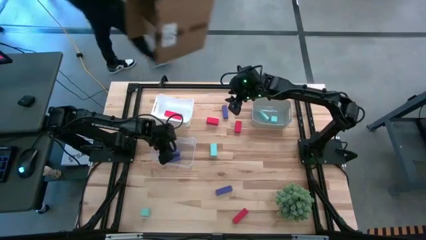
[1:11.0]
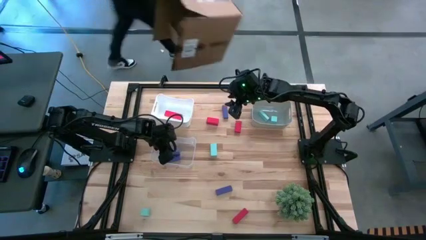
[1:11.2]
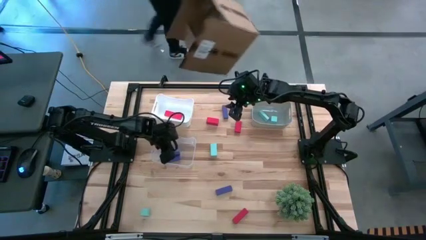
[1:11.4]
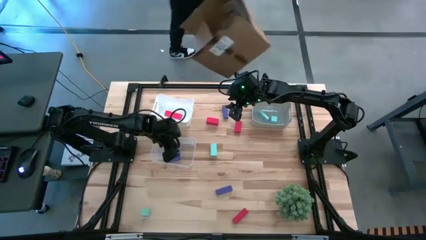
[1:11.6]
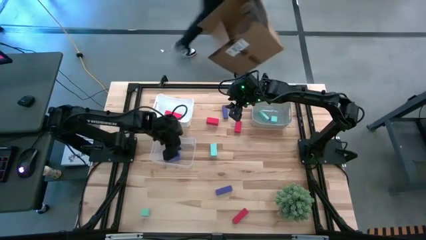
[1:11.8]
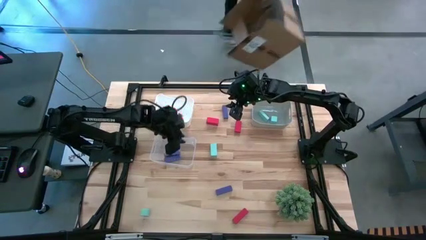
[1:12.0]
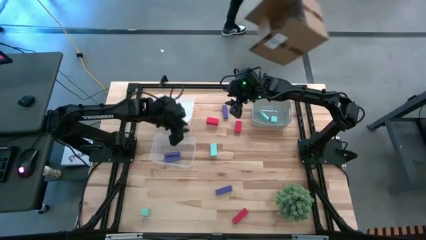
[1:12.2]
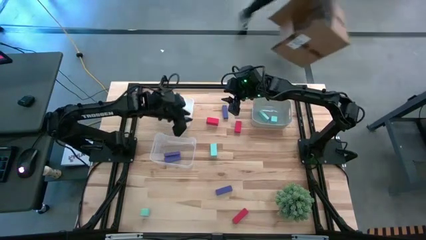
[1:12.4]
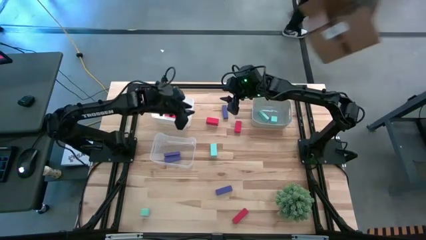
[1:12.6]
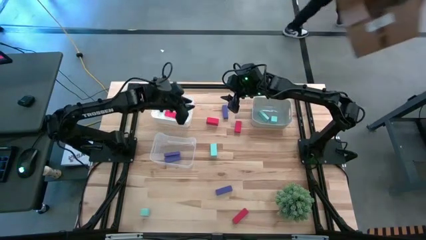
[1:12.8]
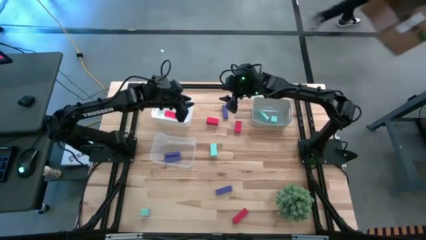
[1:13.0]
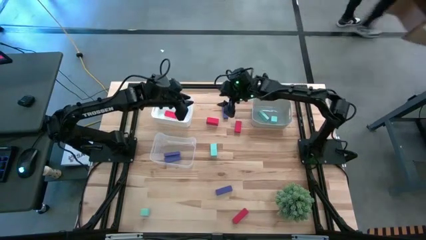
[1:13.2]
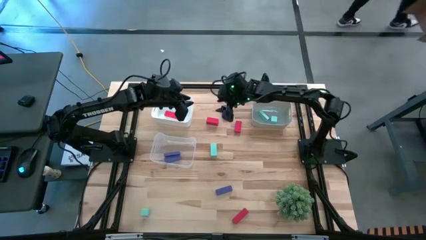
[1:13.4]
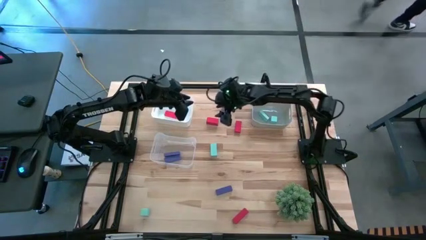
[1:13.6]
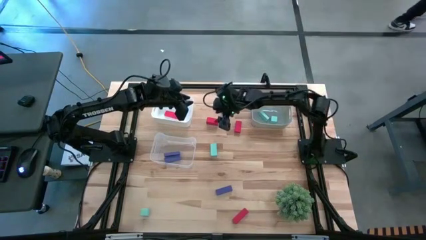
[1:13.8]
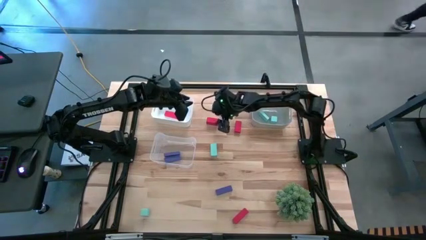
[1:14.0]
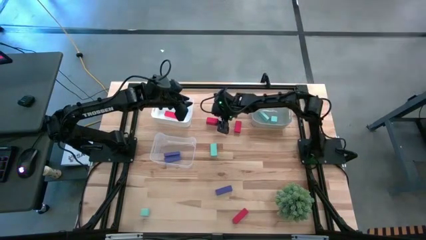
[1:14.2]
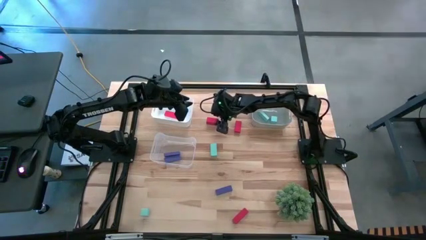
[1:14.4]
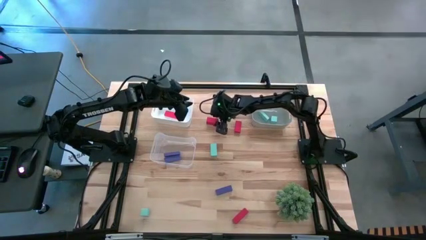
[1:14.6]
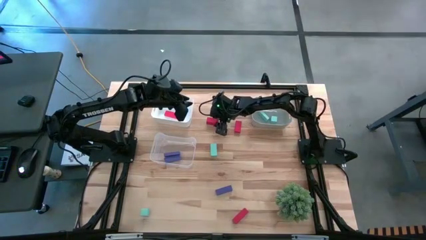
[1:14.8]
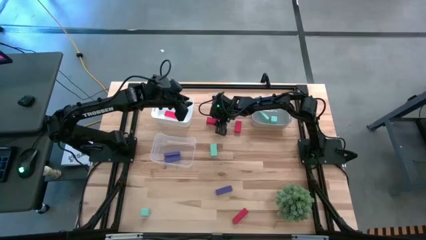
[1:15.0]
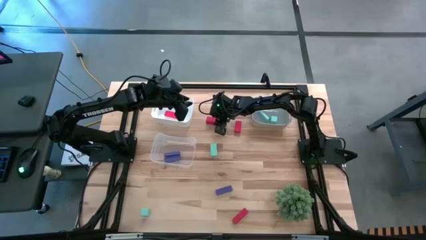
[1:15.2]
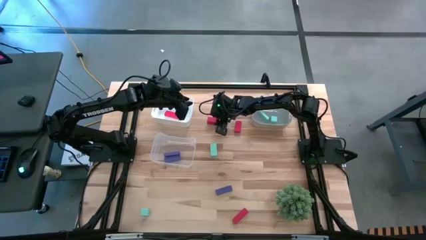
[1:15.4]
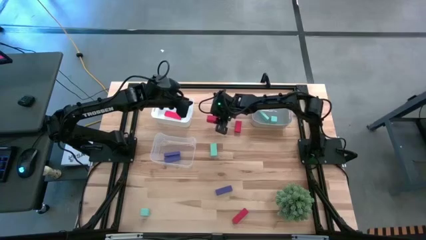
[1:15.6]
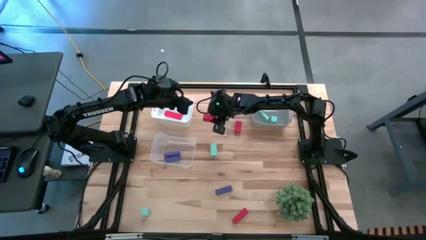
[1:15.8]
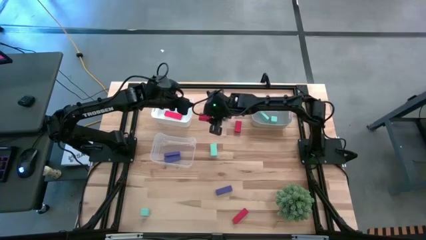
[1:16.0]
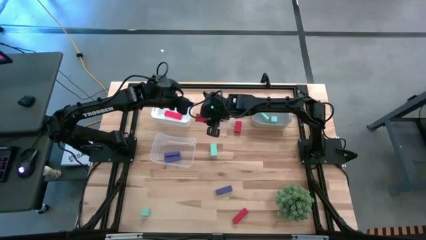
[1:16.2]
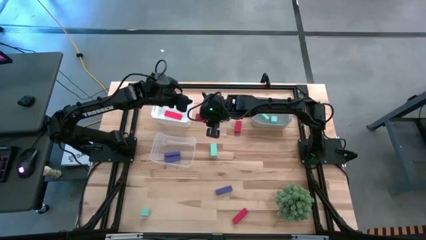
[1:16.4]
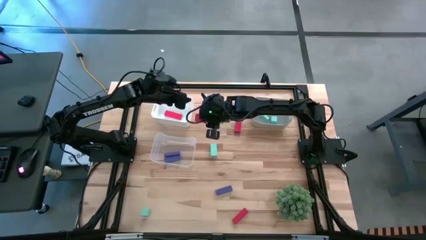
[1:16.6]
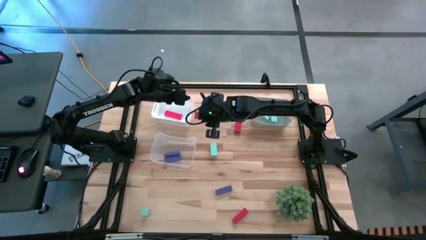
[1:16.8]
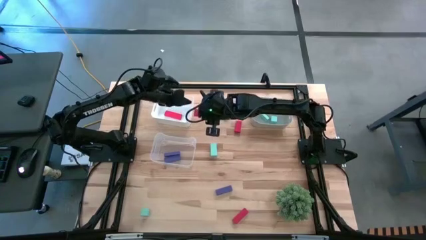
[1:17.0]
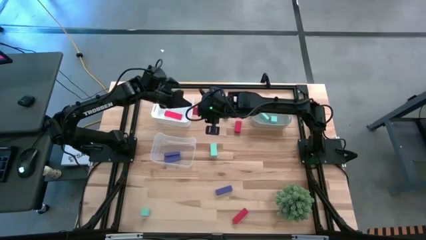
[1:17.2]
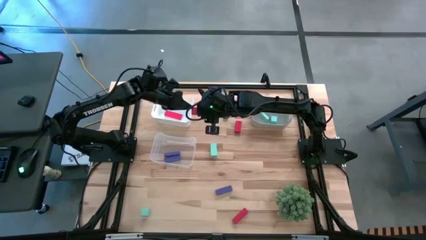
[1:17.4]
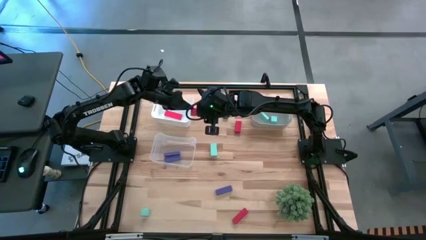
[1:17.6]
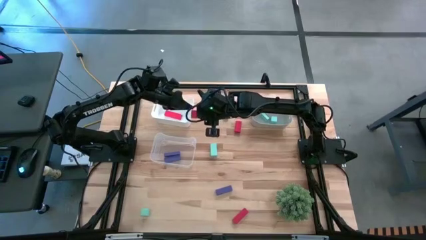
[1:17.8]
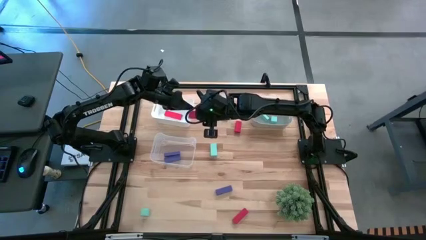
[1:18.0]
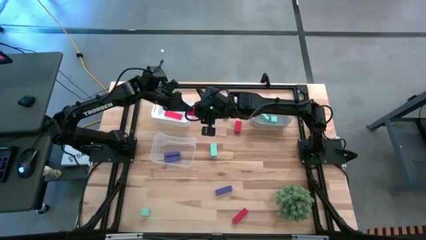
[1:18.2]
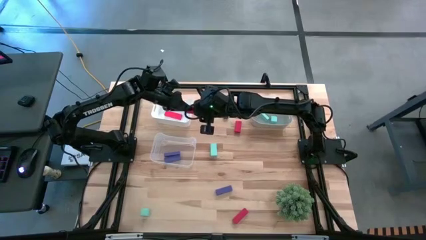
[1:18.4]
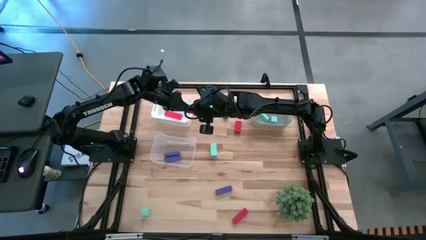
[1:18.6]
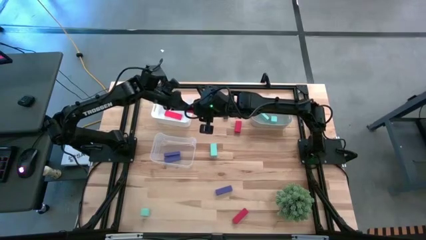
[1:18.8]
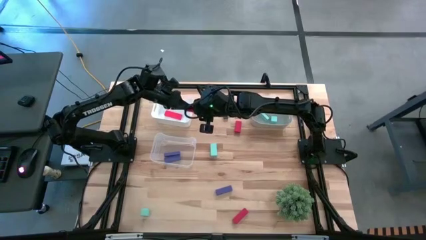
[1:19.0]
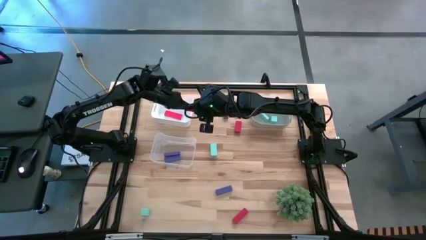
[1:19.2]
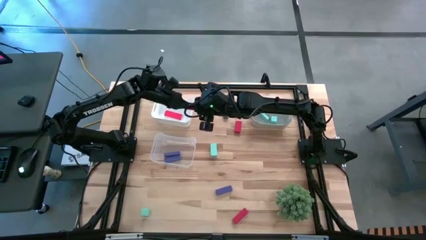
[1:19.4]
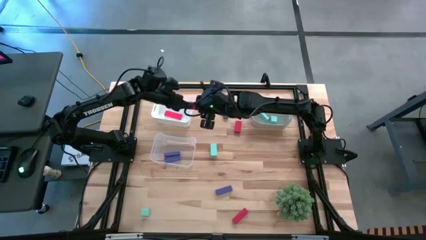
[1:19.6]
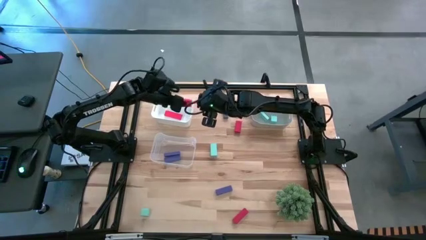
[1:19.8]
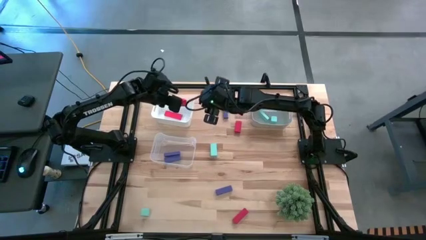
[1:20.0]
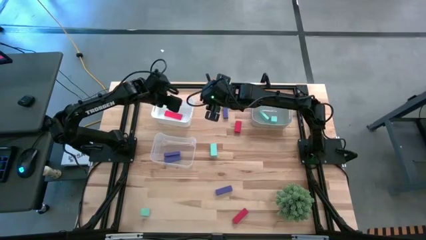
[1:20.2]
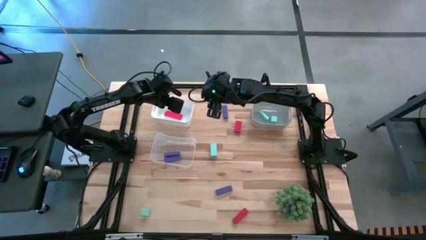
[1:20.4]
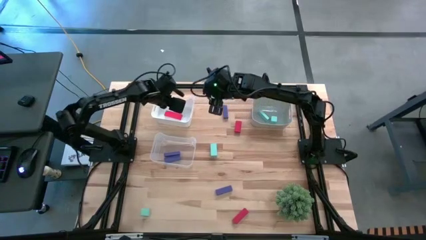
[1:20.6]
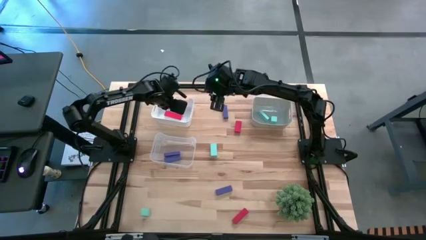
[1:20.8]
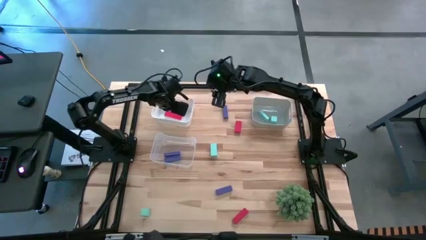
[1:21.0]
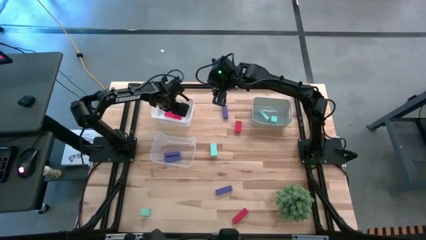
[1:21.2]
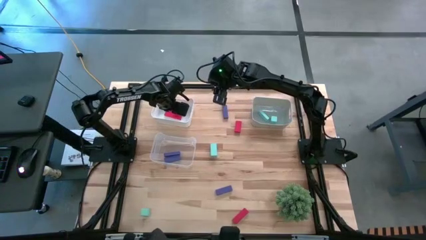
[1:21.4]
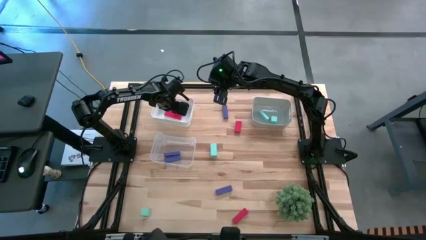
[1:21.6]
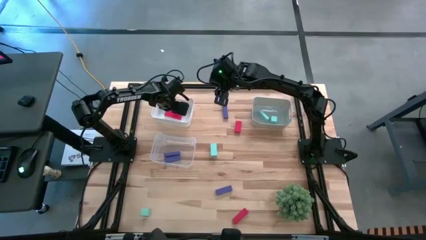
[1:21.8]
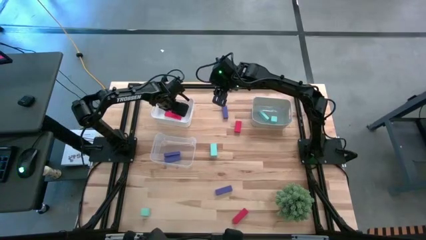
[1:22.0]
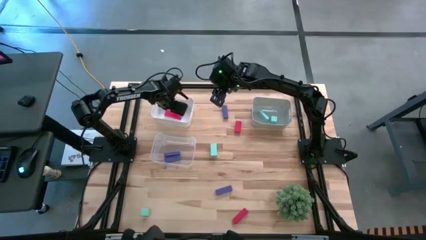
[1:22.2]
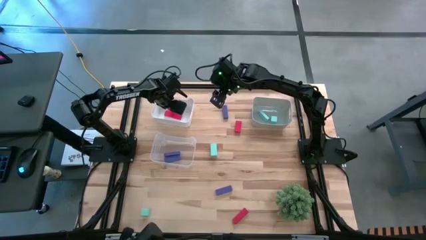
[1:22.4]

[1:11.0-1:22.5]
Task: Sort & place blocks by color
Put the red block into the white bin

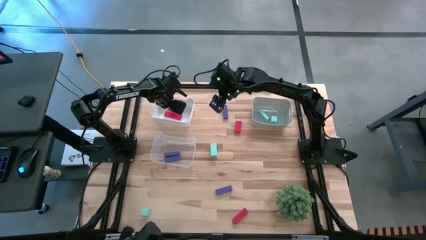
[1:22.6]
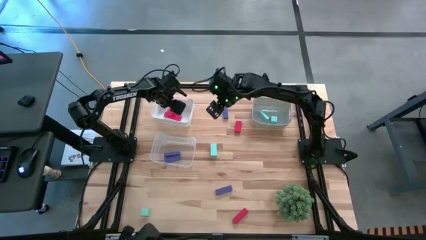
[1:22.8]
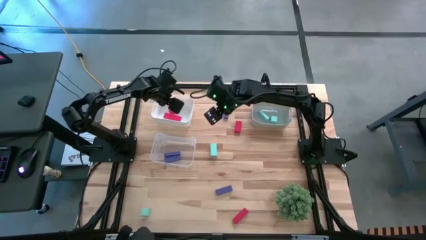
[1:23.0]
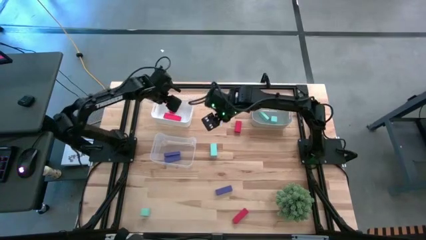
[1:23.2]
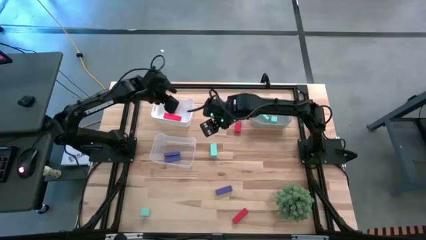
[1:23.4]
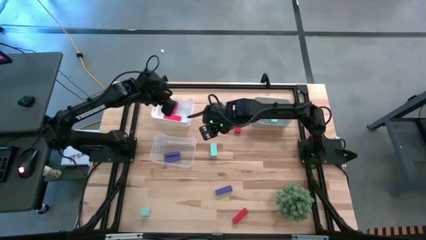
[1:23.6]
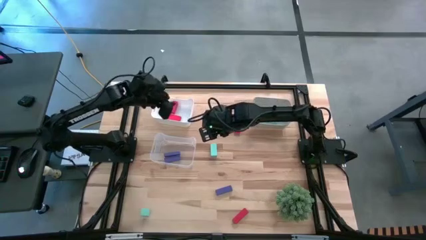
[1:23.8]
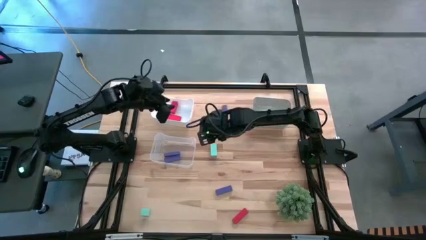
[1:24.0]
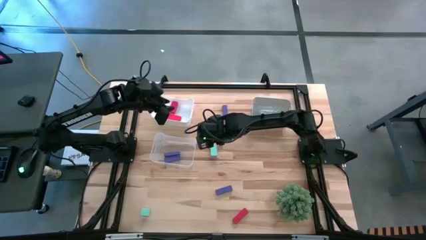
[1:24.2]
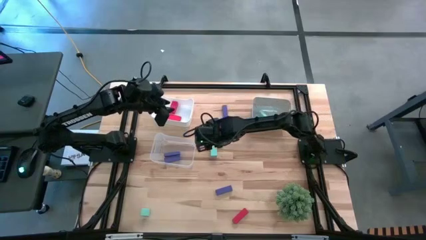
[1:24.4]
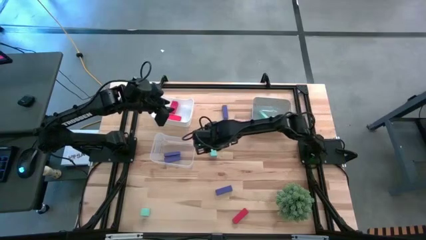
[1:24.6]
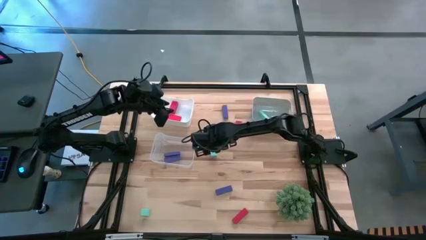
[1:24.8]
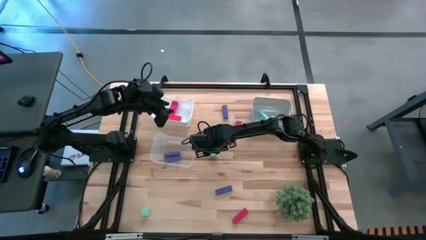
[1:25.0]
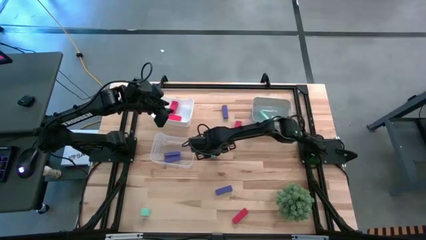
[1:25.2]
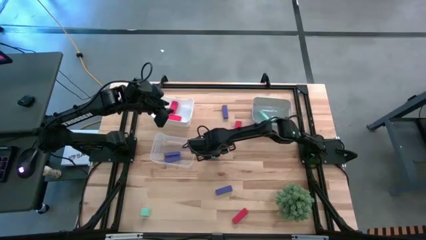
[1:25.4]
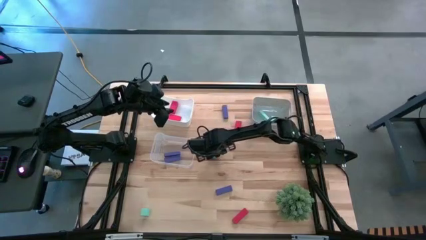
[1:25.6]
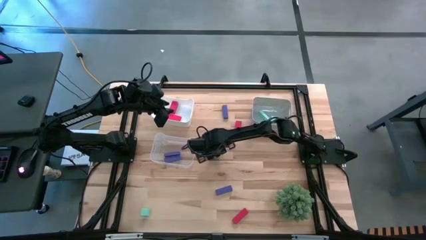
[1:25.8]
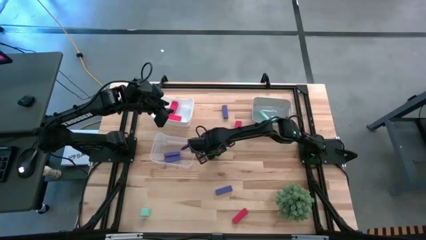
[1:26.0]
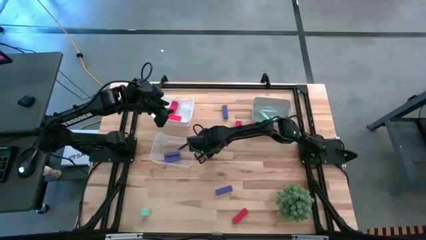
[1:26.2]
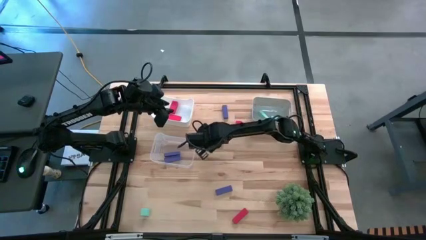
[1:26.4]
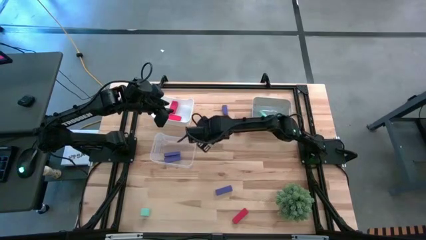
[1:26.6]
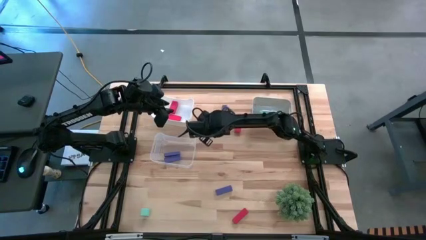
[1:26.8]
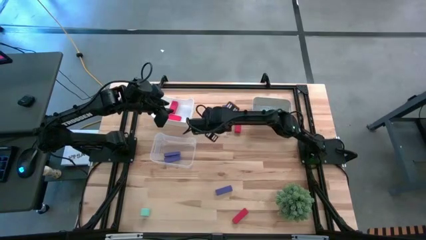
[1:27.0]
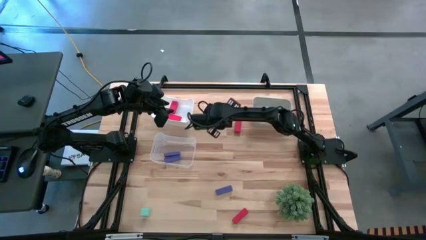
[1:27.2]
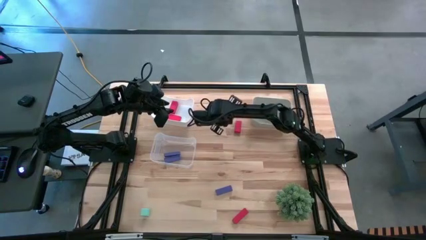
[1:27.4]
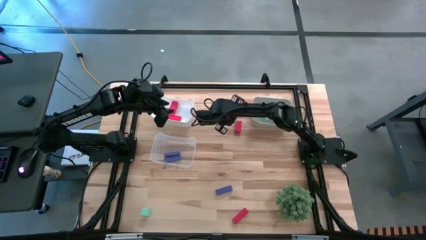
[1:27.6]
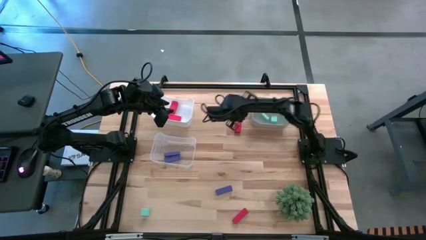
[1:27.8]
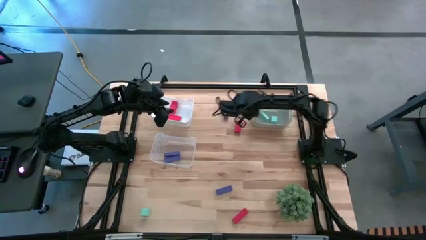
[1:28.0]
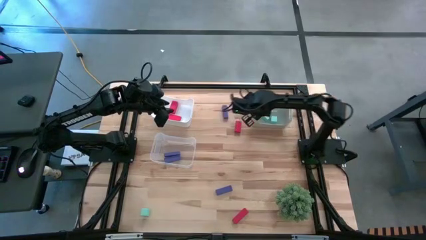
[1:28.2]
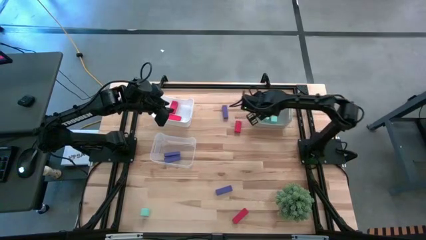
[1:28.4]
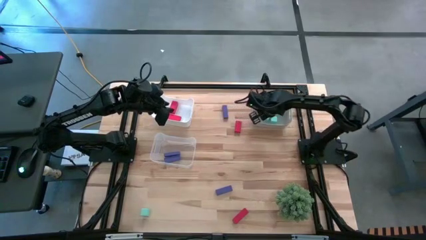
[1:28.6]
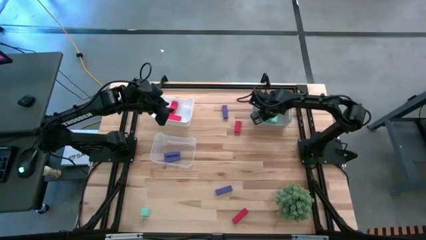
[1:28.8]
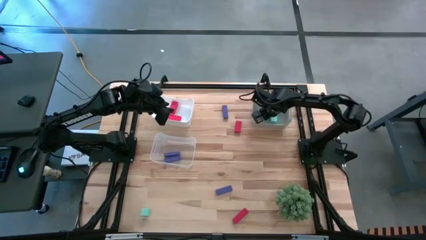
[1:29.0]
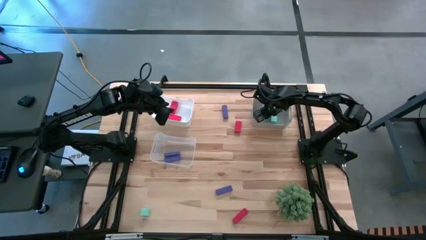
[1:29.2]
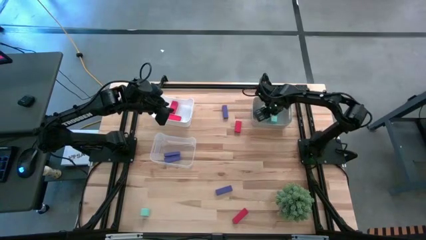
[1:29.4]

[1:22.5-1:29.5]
Put the light blue block into the grey bin
